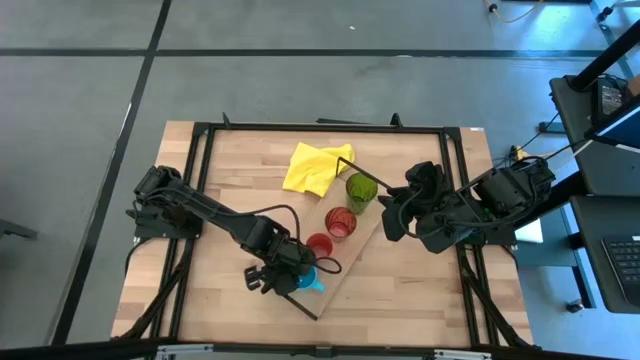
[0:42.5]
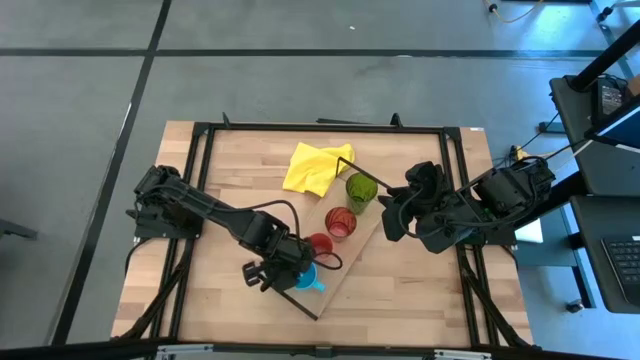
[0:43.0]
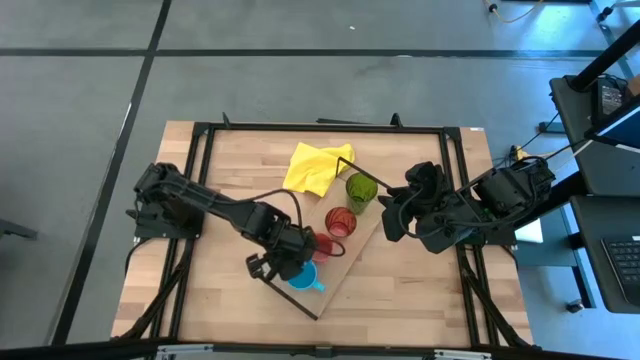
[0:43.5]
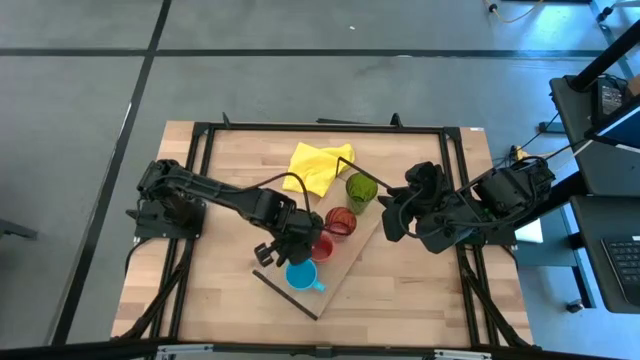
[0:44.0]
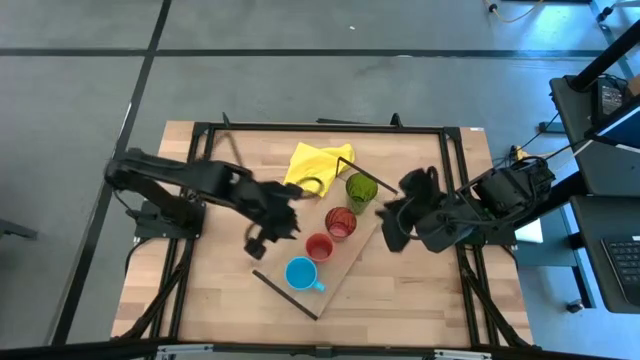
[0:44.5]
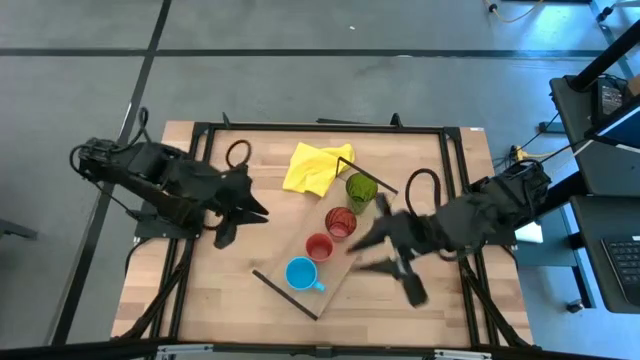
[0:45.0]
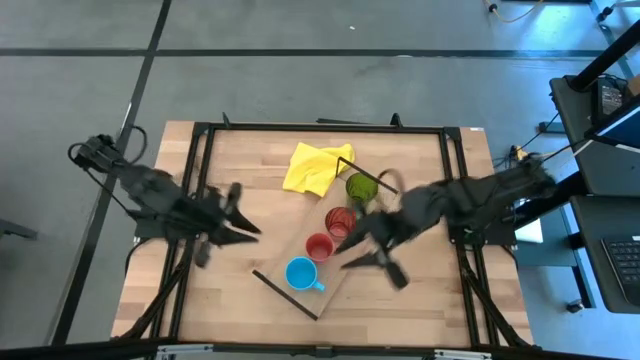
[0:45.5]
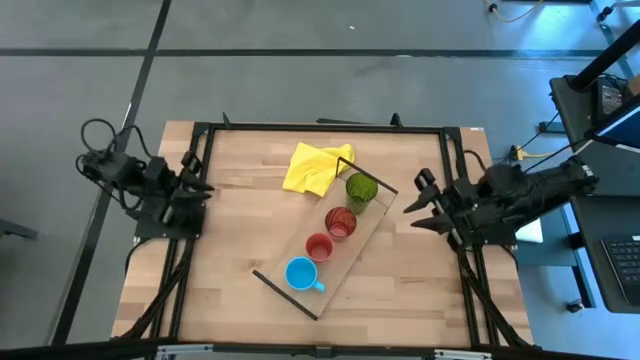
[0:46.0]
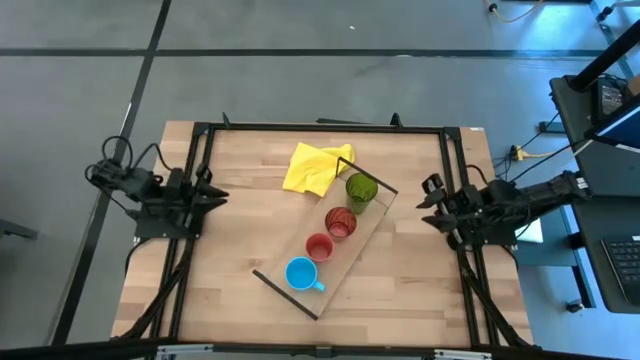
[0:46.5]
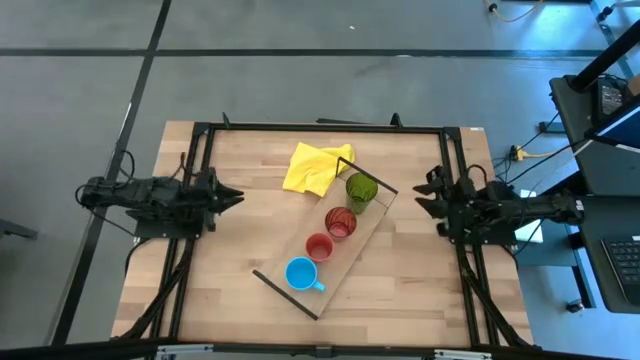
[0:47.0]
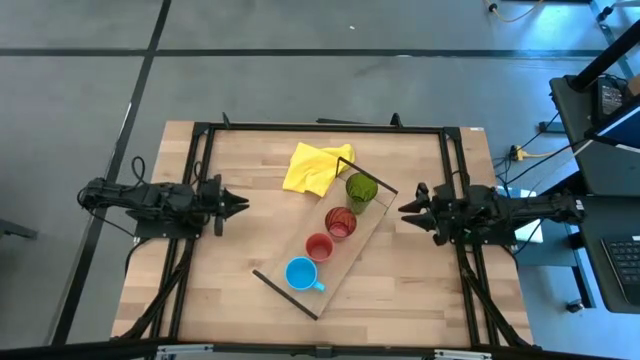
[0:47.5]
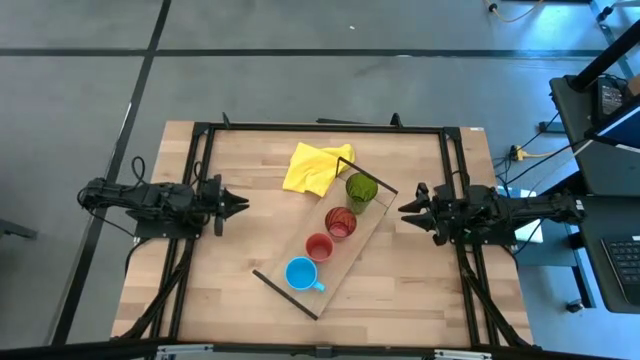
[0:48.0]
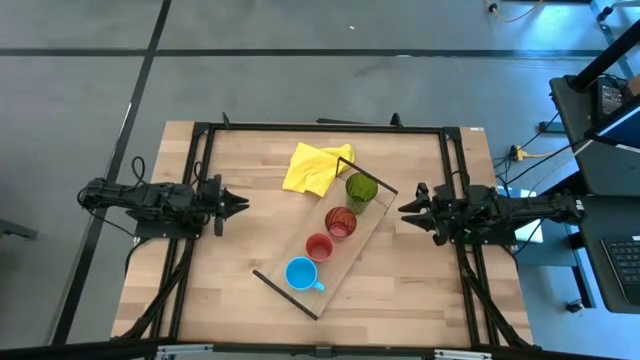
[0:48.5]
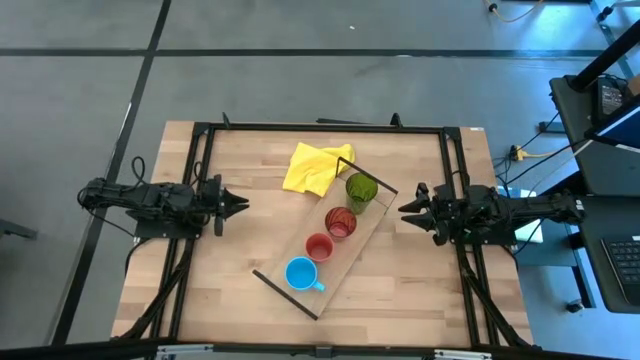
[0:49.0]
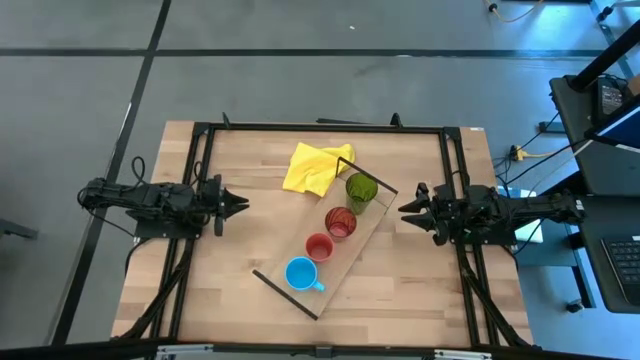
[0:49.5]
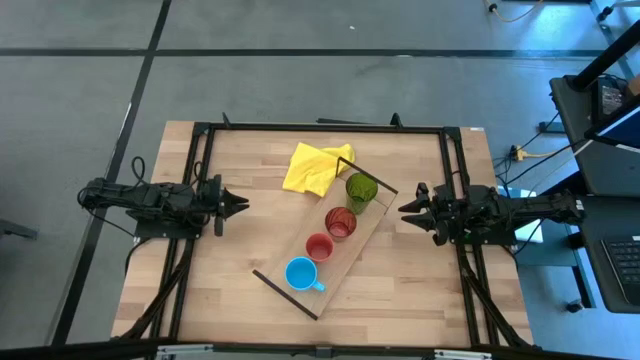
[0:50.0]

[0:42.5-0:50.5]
Task: Stack small to large cups/mugs on shelf
Return to Home Position

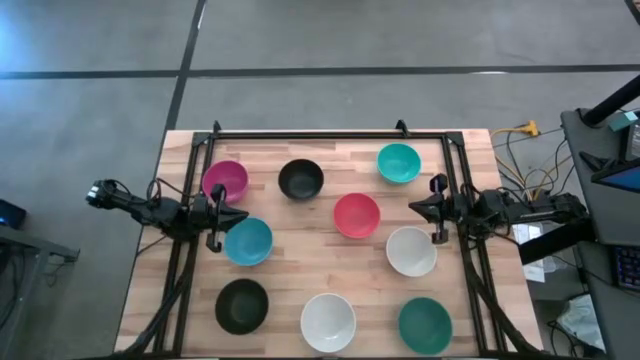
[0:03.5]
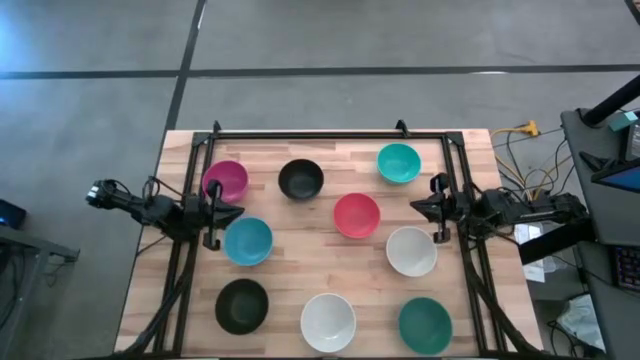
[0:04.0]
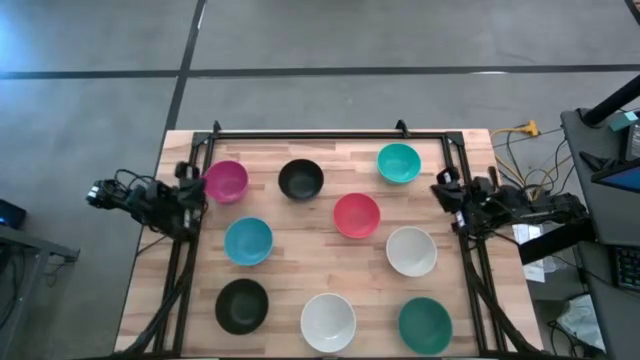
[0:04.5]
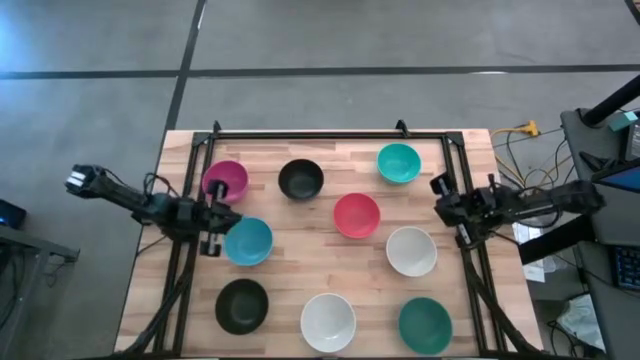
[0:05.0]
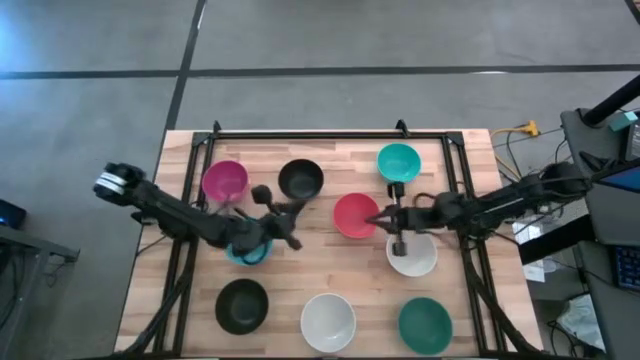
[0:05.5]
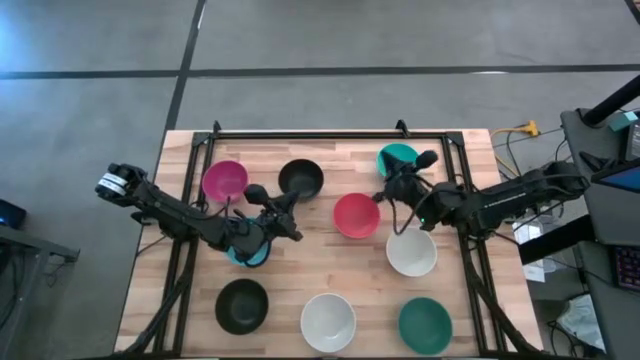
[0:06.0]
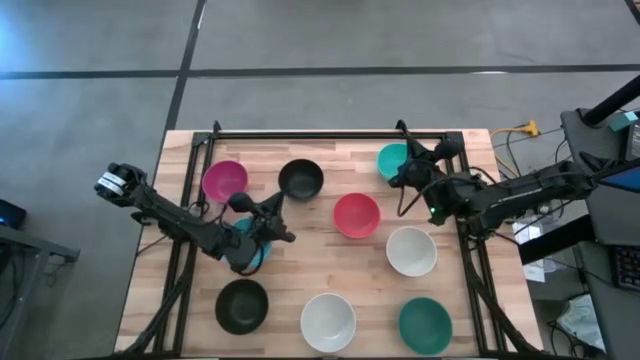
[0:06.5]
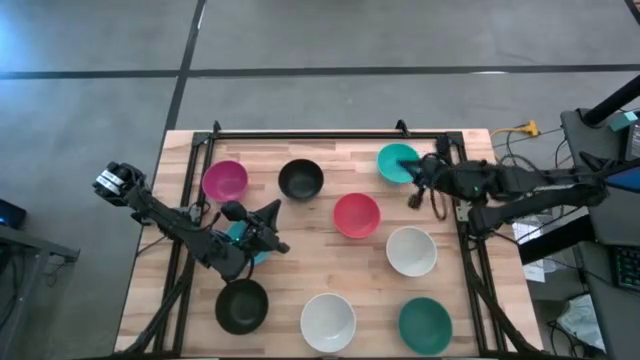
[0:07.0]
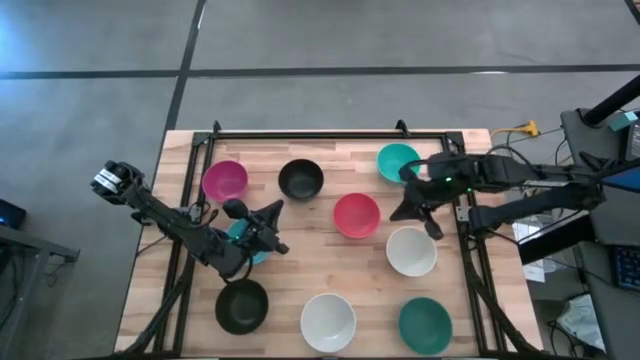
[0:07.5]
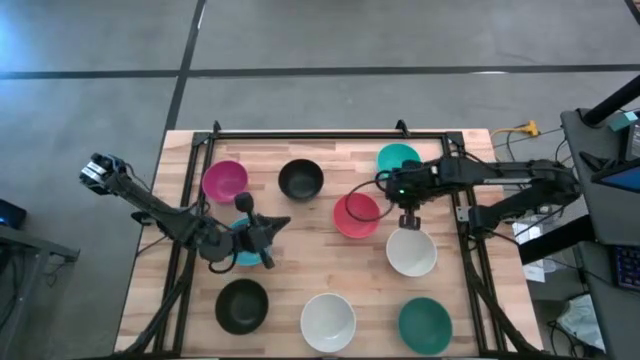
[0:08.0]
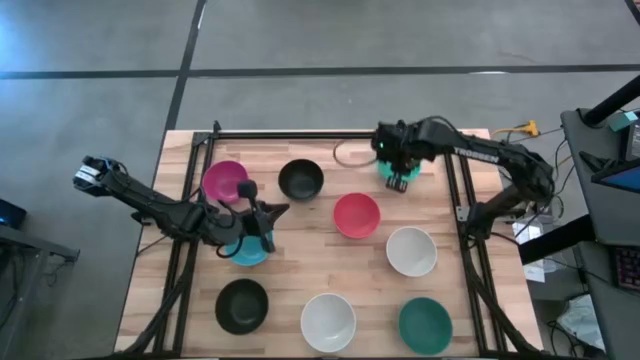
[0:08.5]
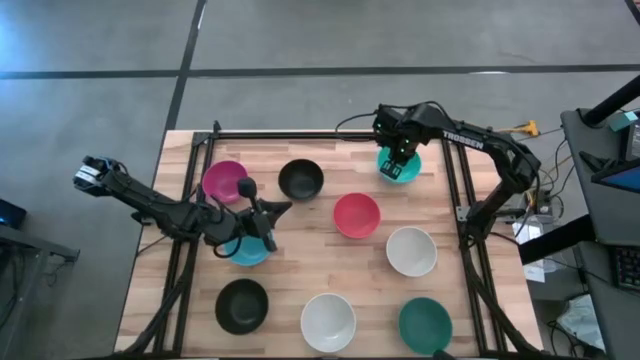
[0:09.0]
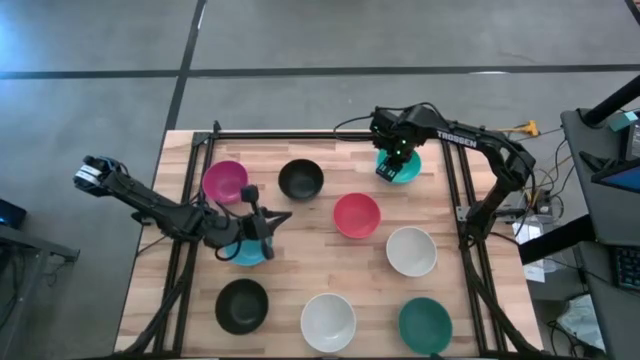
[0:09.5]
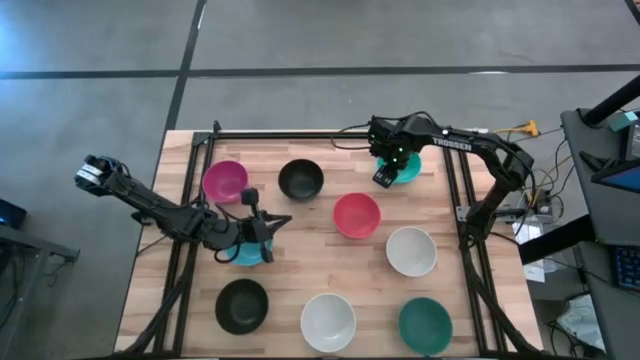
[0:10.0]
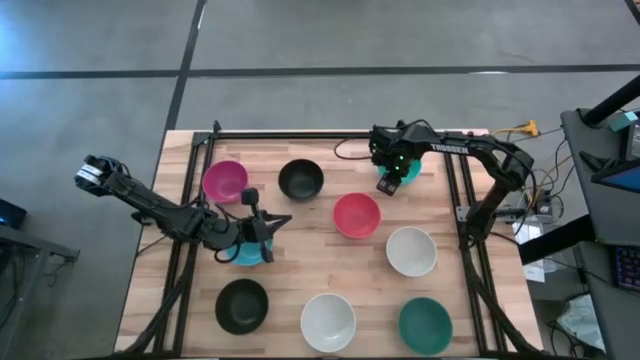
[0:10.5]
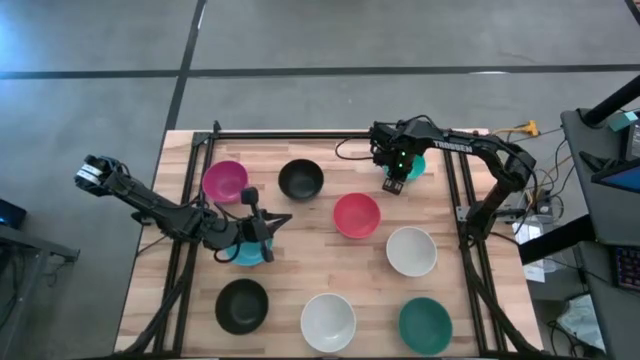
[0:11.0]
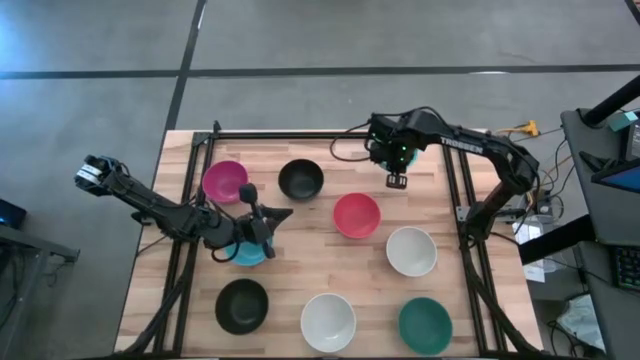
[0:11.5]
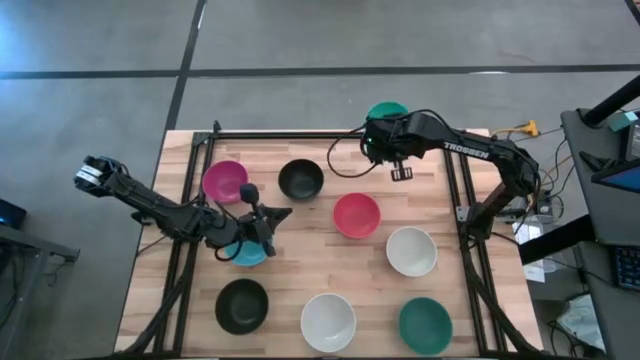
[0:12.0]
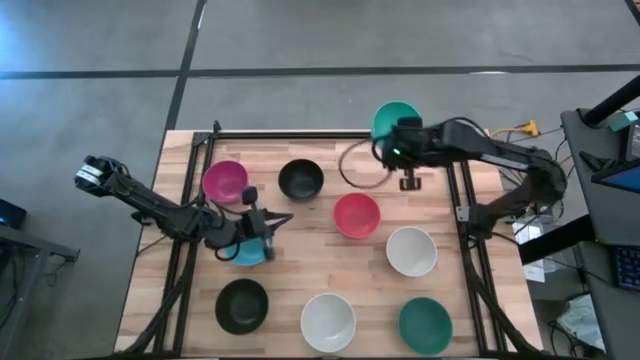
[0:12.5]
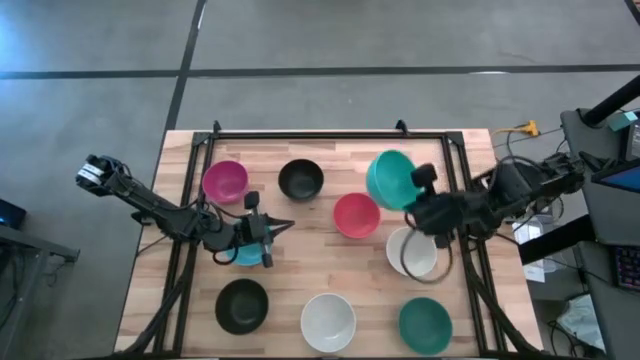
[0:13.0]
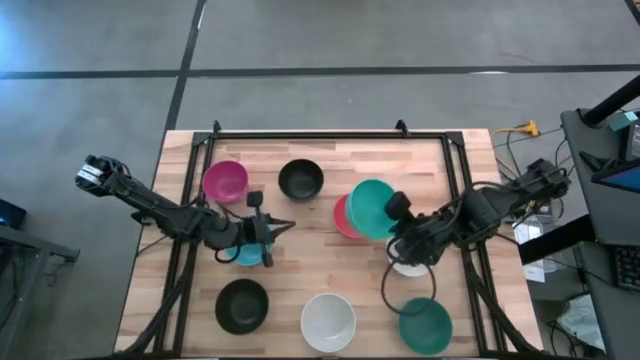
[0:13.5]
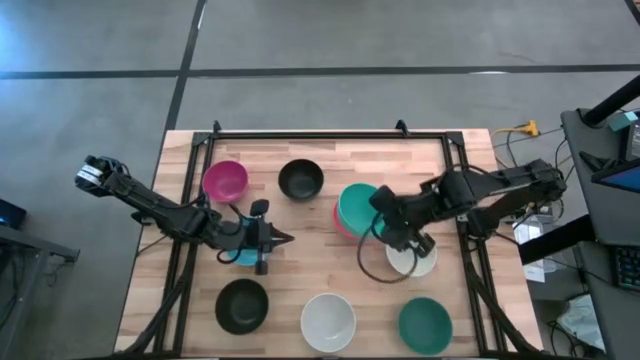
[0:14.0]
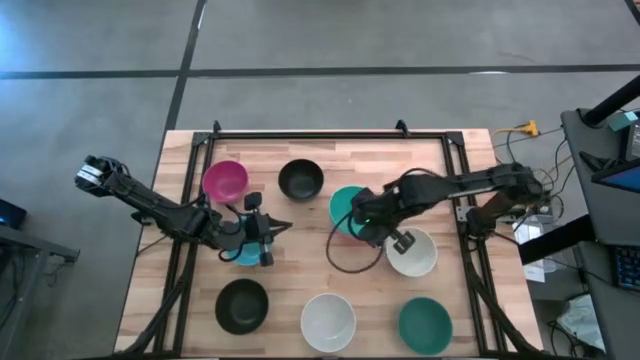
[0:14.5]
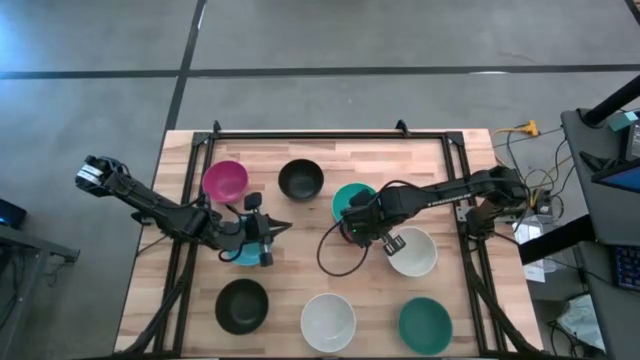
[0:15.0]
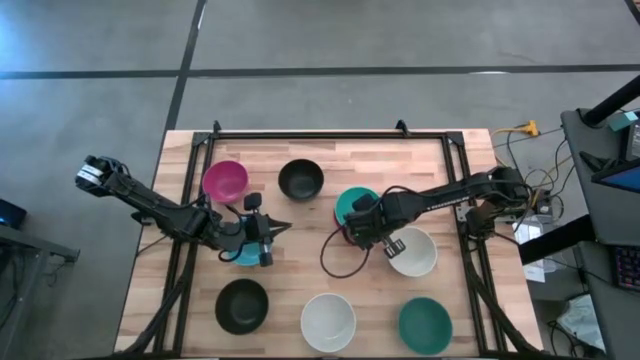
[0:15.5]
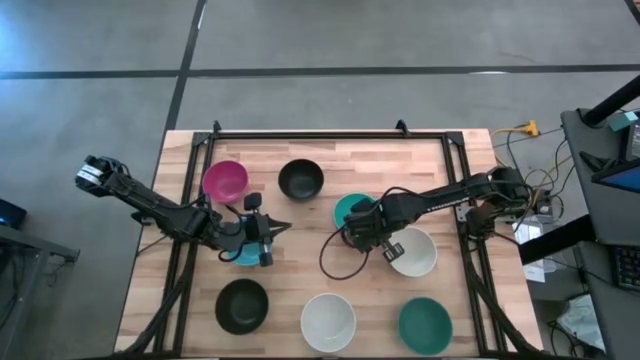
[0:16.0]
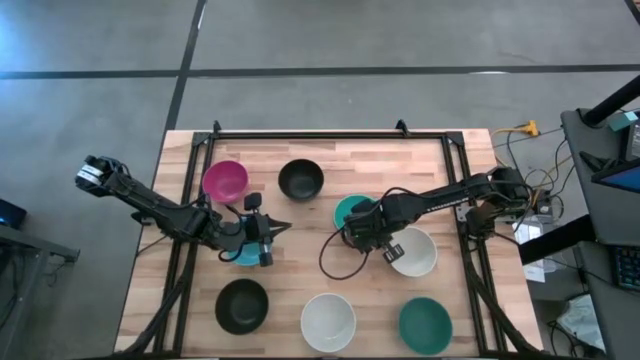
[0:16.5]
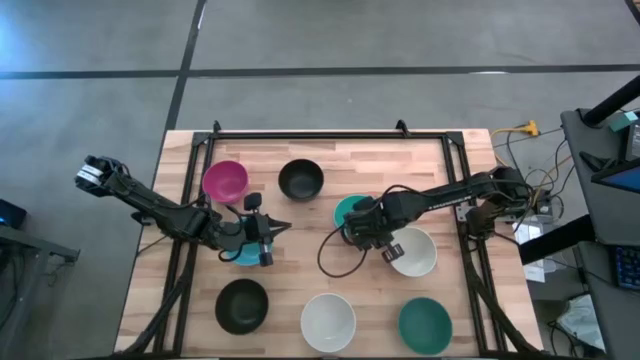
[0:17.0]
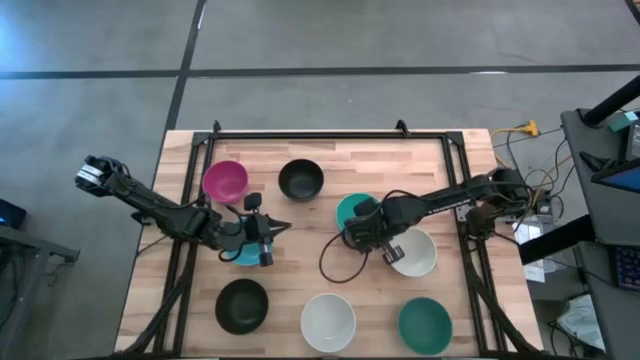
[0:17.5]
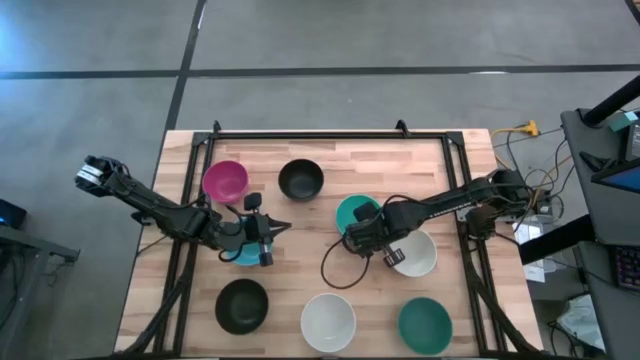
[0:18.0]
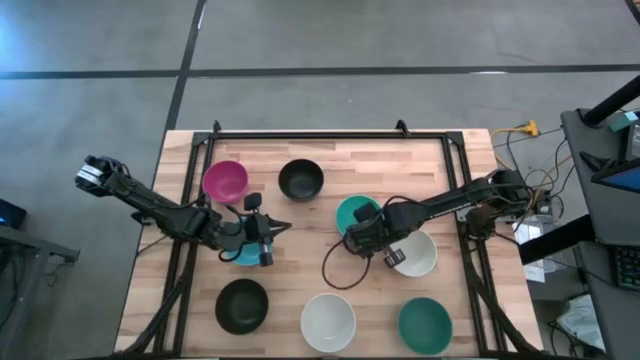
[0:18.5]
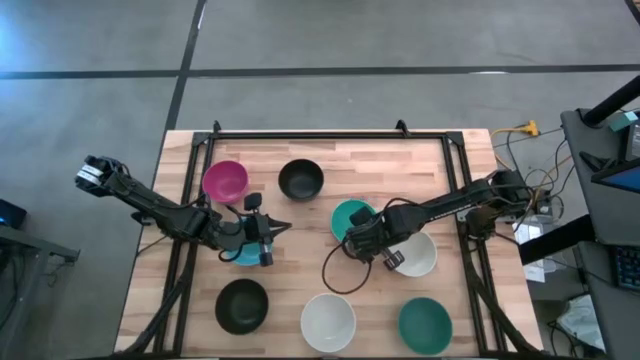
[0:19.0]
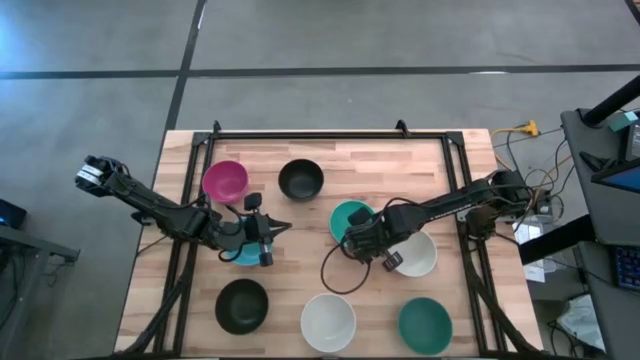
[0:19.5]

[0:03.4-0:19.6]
Task: Nest bowls inside each other
Stack the top blue bowl on the orange bowl
